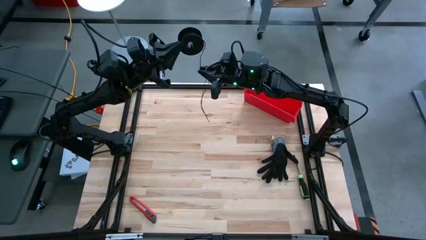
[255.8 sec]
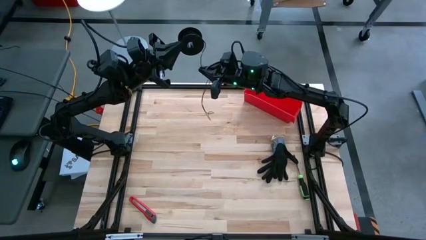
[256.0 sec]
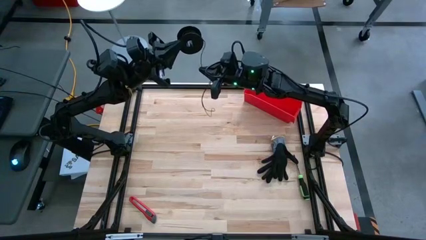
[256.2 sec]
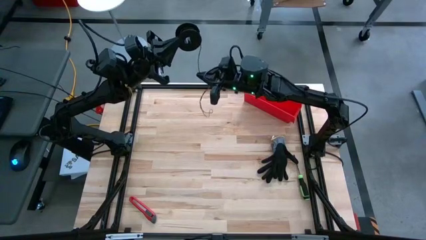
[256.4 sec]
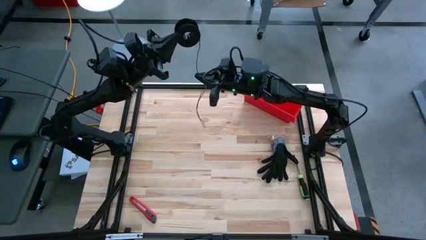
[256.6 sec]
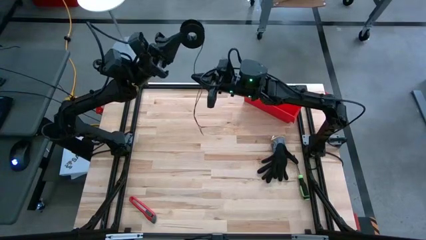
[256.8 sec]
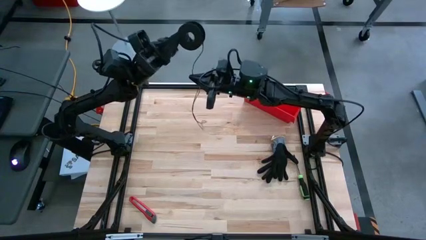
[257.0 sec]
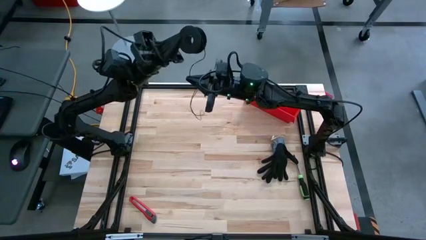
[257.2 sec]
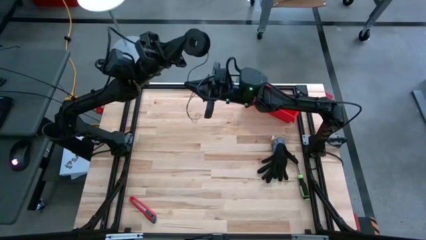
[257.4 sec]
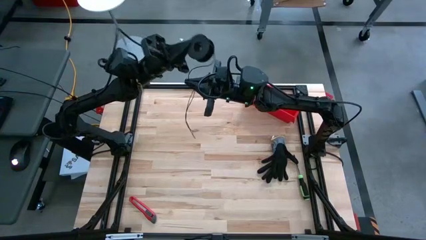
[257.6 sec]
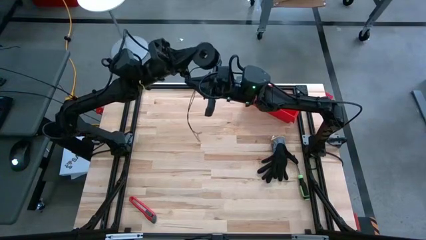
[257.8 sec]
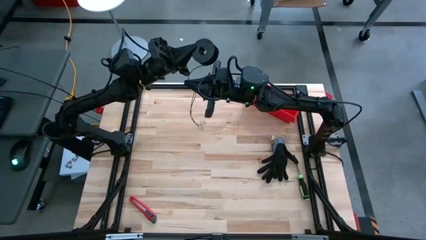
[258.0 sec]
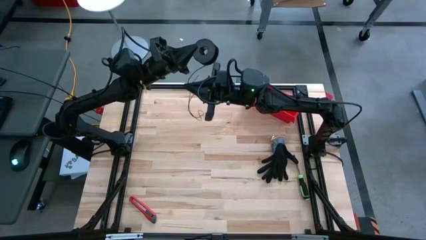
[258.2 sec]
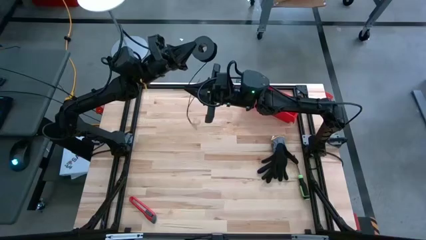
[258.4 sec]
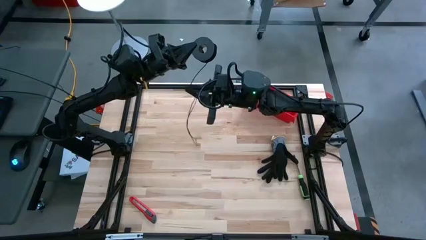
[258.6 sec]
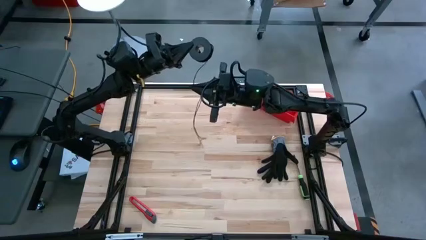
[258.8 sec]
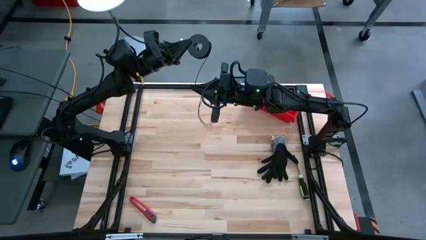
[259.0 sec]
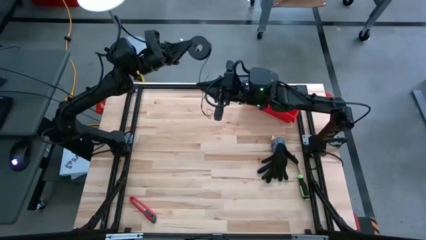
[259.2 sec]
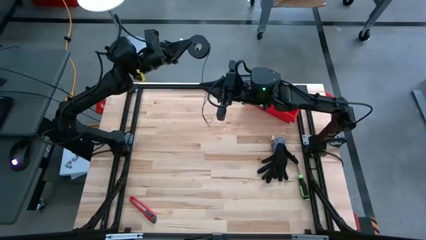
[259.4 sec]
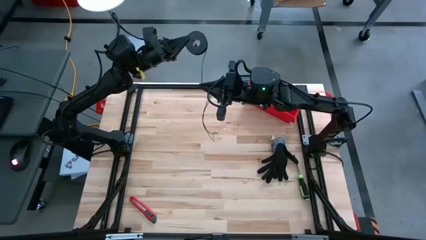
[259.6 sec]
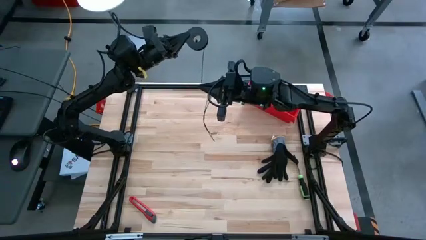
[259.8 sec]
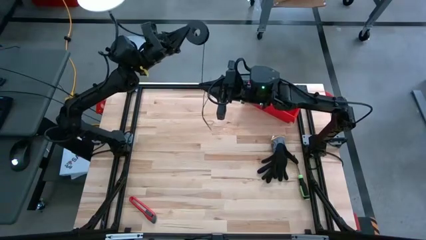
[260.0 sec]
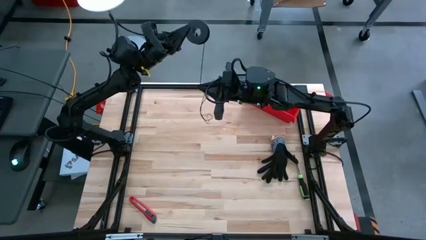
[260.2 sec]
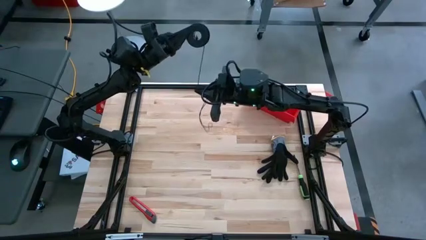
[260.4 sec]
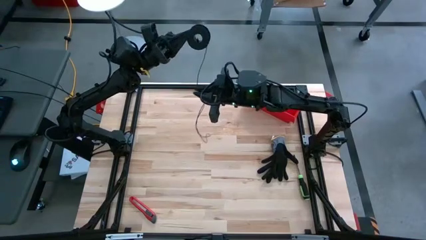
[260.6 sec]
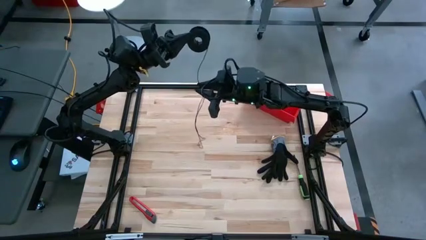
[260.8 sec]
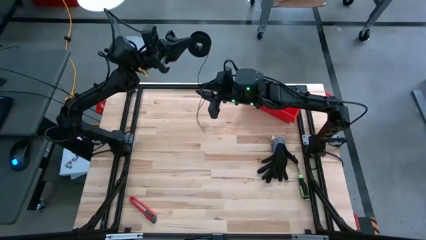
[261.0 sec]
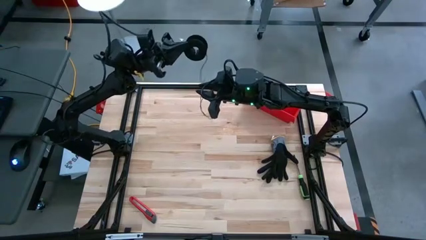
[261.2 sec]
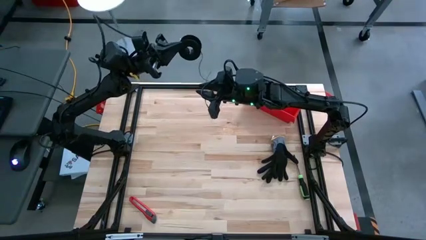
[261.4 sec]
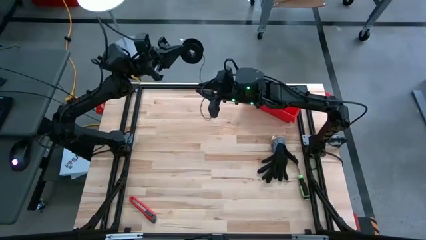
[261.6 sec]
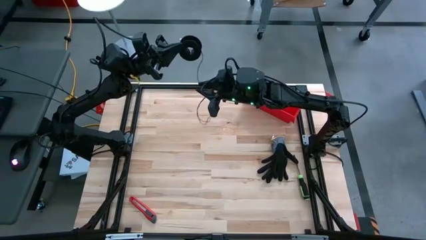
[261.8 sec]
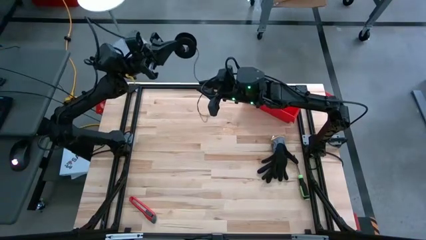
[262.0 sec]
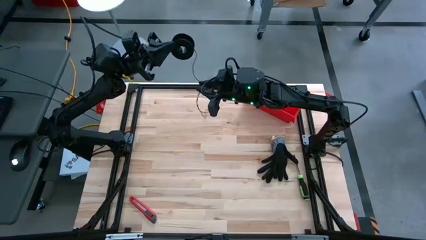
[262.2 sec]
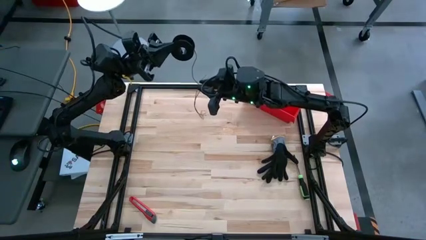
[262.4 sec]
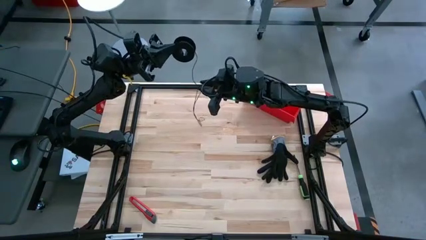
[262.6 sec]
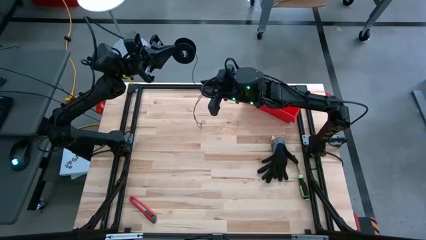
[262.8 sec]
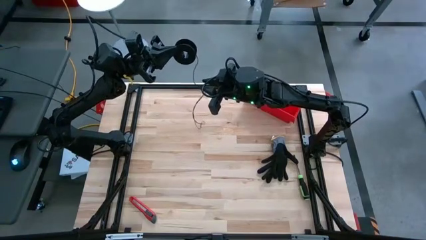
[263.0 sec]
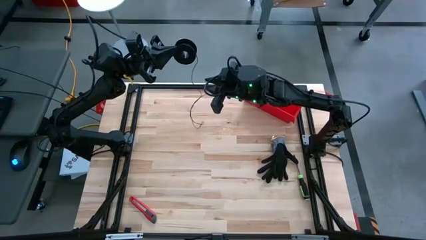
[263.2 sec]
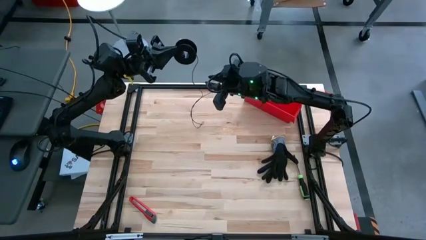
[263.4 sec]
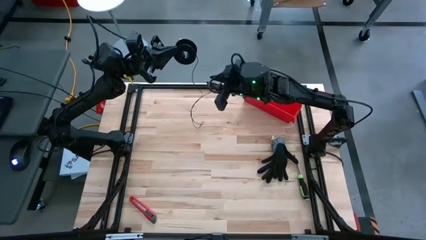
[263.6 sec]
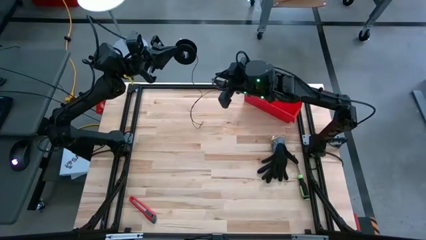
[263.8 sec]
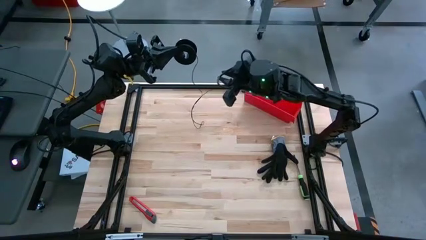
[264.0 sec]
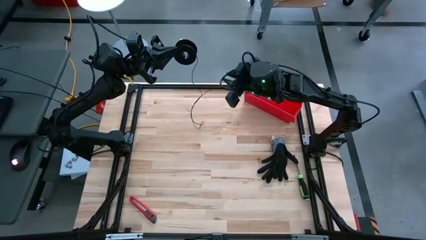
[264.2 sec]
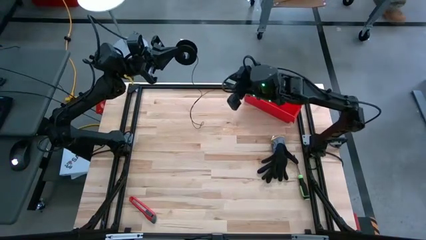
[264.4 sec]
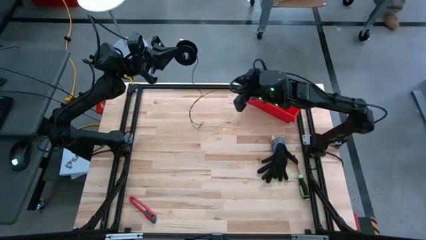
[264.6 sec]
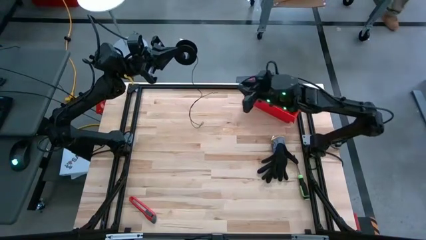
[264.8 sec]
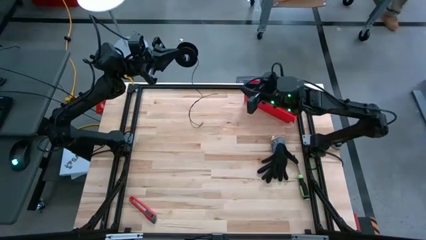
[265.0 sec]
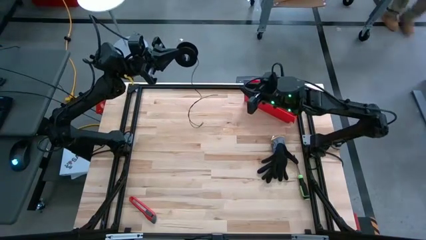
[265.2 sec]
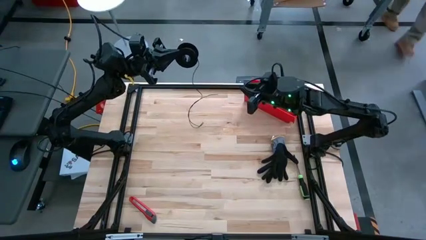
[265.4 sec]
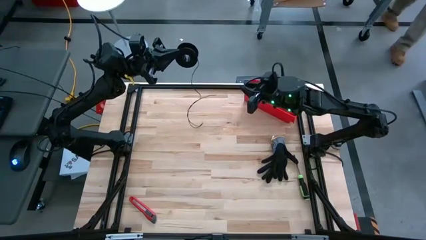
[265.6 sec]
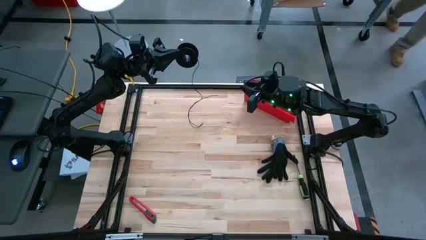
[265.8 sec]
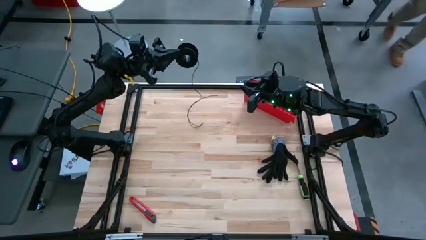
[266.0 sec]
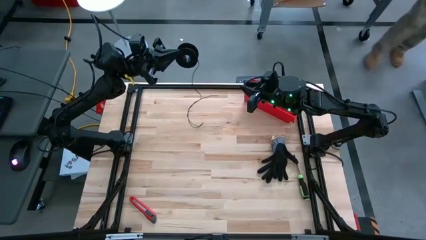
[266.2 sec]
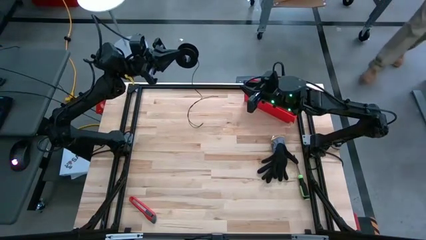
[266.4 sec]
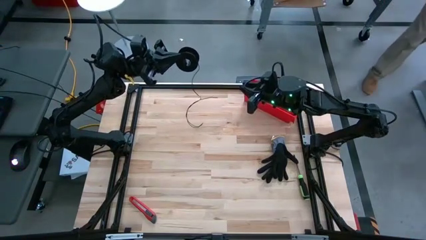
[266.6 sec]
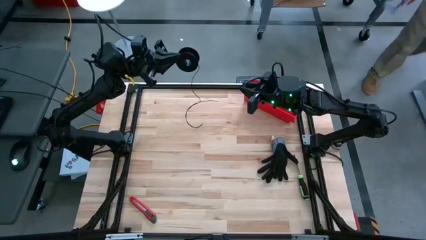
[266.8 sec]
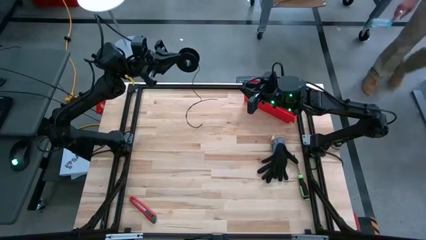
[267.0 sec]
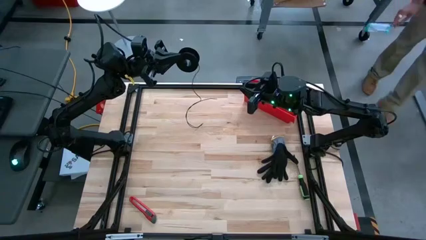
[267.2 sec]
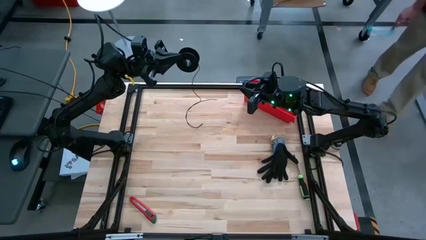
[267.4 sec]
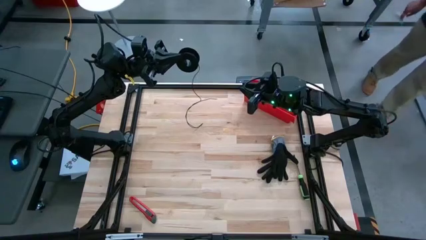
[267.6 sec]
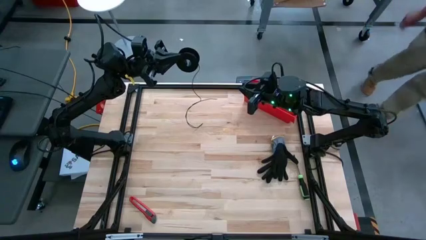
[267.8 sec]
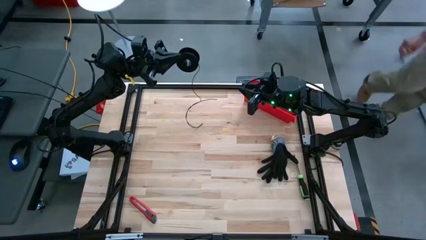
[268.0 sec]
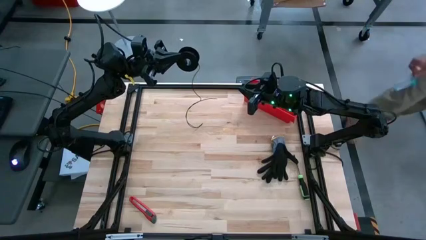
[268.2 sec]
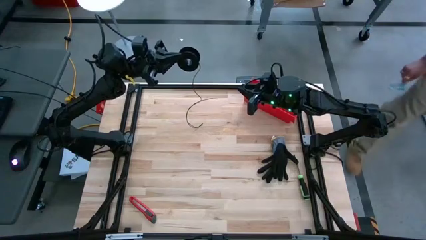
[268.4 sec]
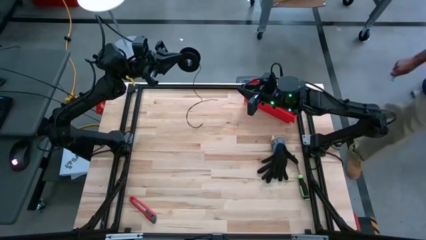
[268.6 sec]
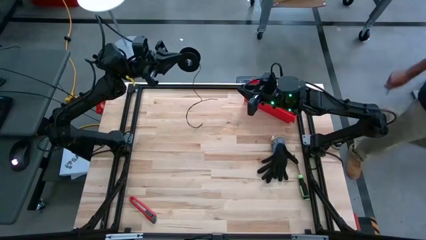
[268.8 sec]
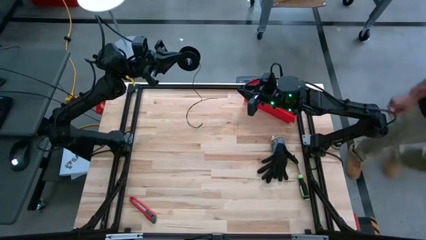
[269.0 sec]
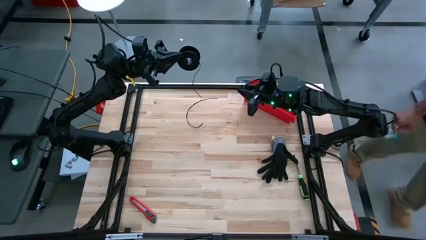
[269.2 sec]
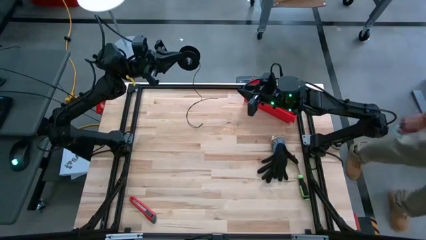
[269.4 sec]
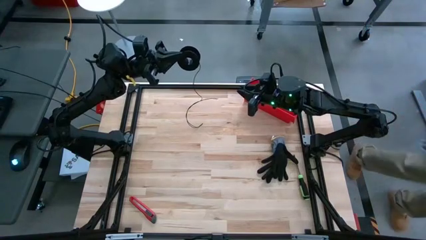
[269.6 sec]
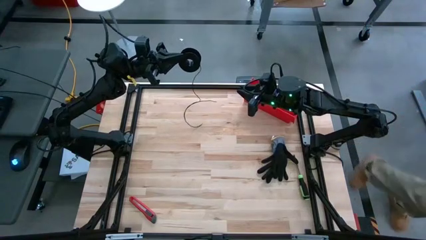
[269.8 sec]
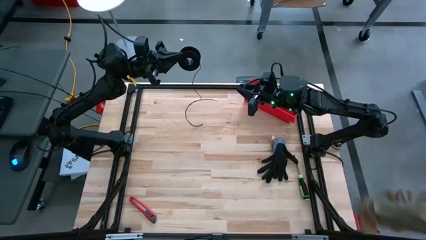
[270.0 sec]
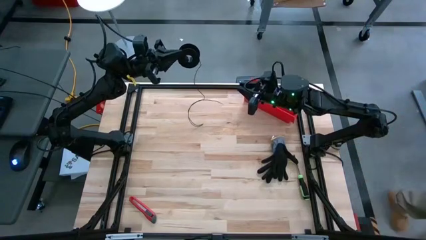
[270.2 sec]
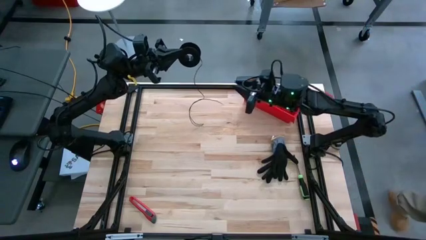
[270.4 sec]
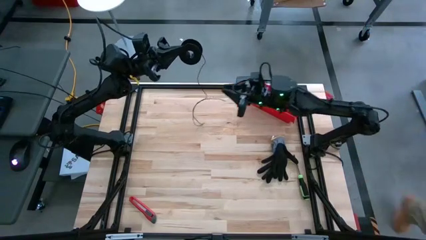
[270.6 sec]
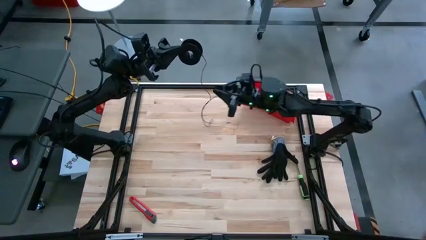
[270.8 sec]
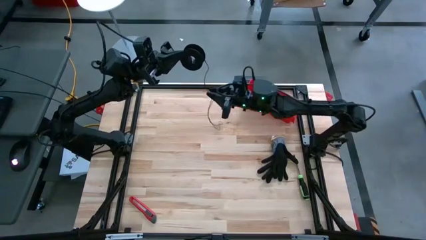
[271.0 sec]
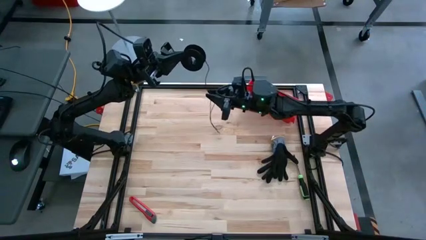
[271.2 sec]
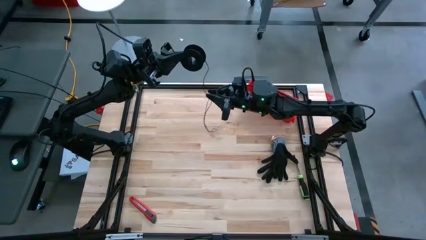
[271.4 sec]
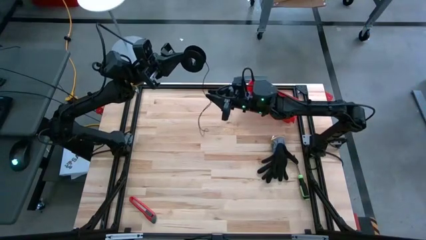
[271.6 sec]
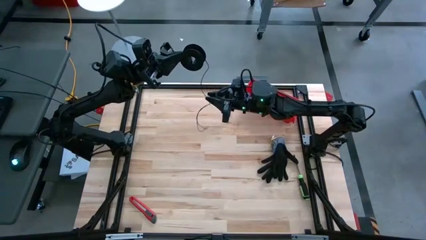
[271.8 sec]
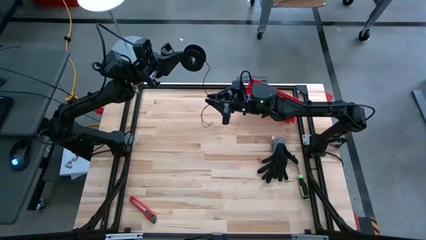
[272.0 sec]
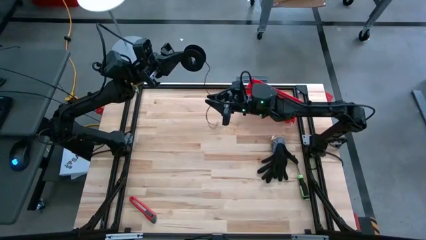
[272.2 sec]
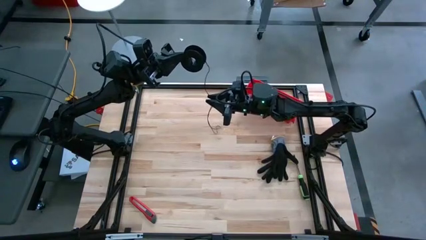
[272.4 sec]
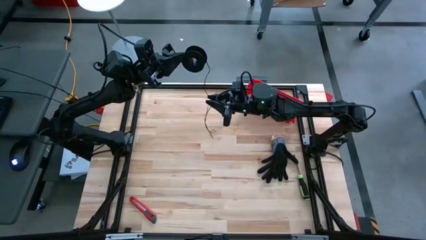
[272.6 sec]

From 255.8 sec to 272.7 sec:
Task: Coil cords
Coil the black wire on the spool
